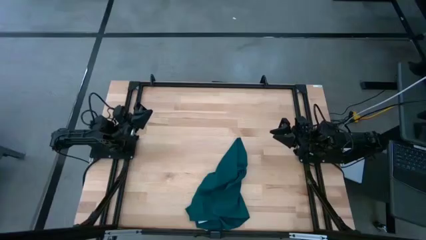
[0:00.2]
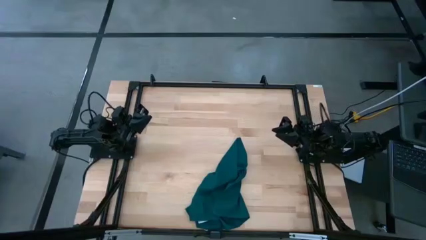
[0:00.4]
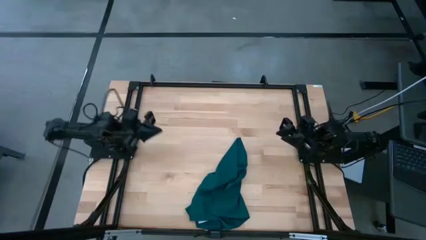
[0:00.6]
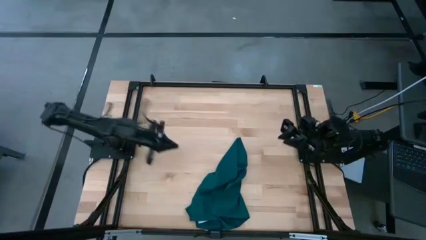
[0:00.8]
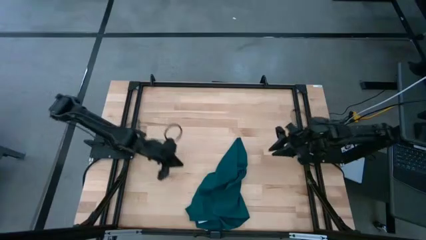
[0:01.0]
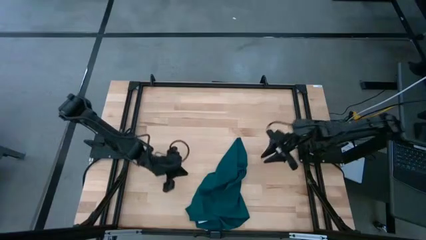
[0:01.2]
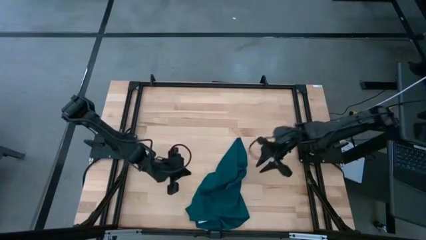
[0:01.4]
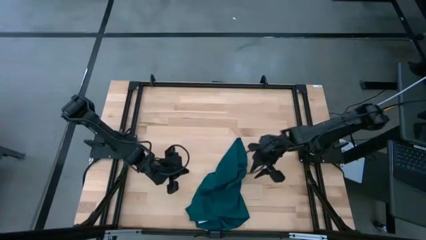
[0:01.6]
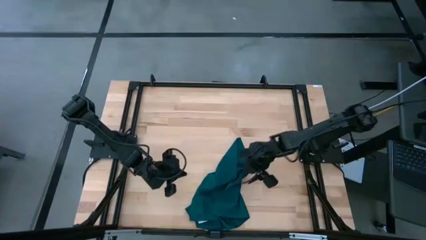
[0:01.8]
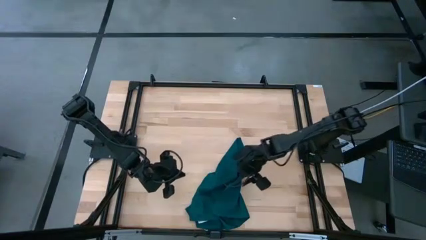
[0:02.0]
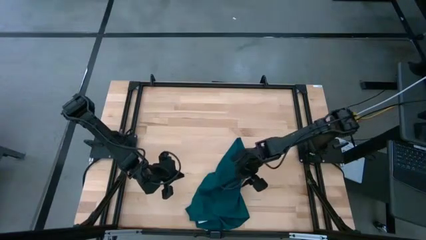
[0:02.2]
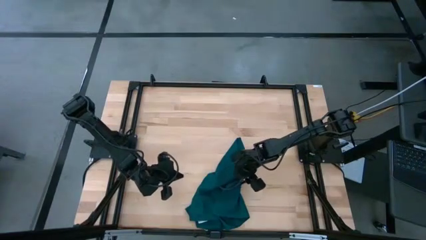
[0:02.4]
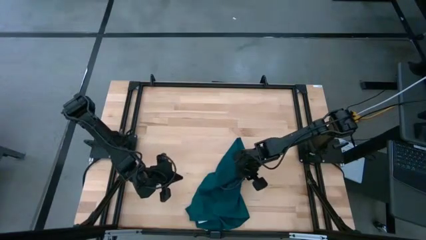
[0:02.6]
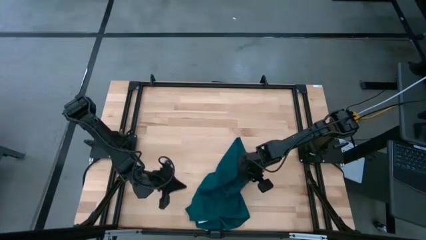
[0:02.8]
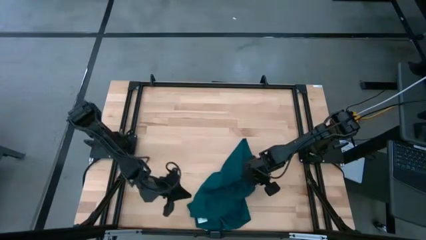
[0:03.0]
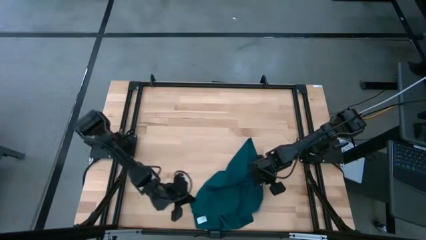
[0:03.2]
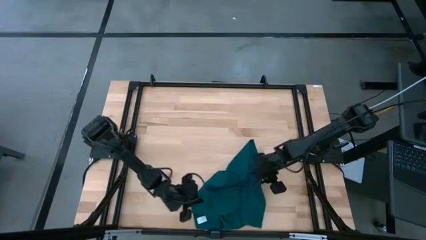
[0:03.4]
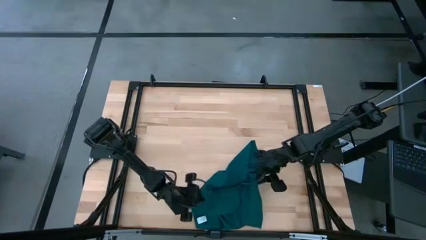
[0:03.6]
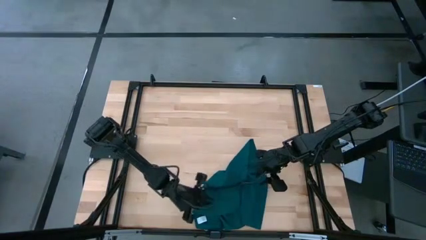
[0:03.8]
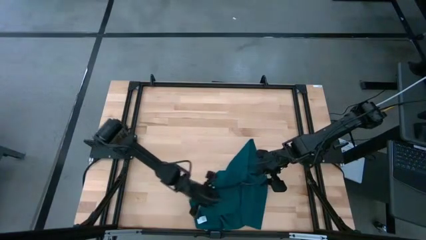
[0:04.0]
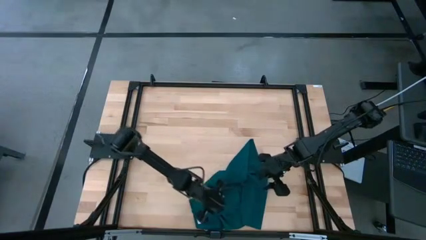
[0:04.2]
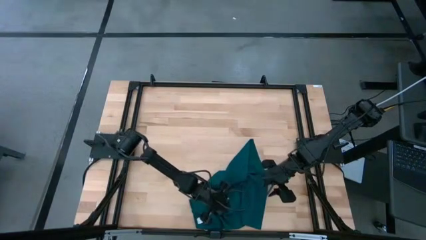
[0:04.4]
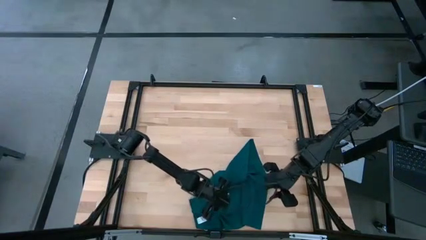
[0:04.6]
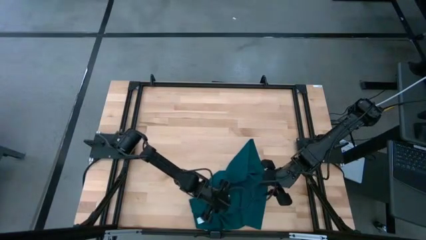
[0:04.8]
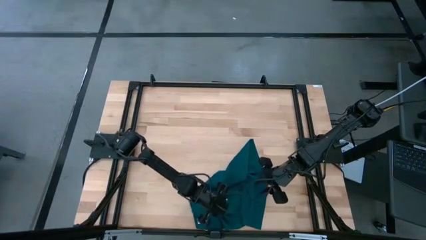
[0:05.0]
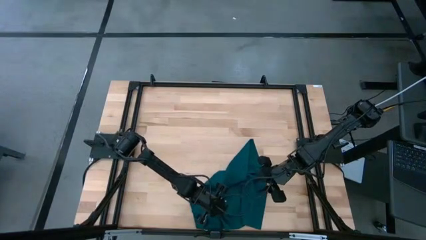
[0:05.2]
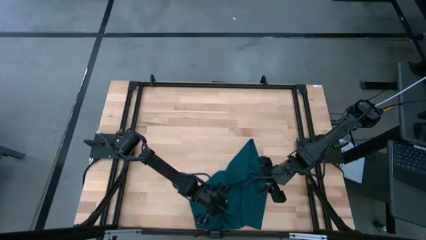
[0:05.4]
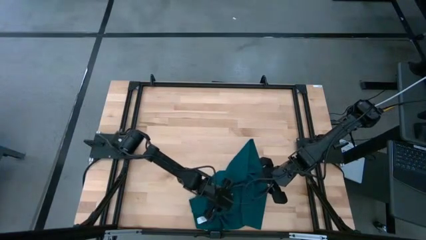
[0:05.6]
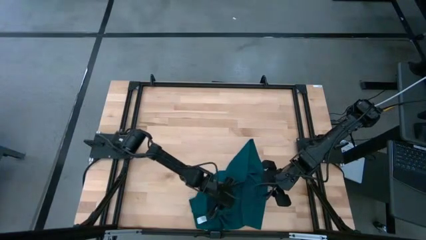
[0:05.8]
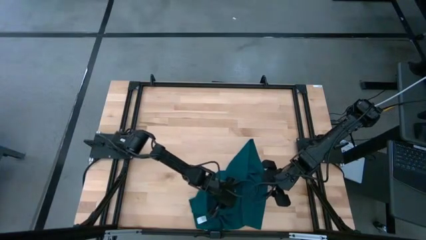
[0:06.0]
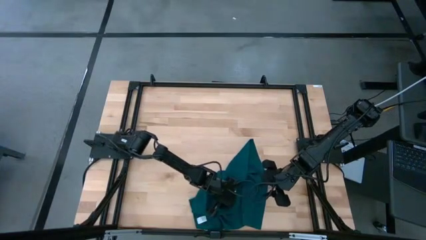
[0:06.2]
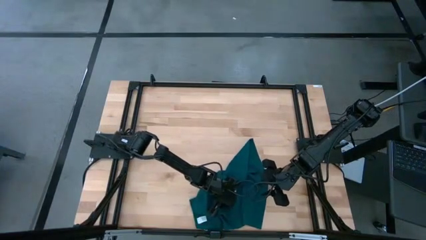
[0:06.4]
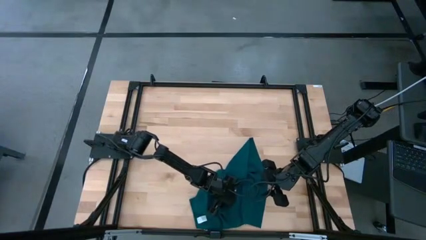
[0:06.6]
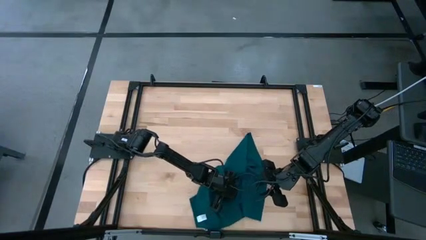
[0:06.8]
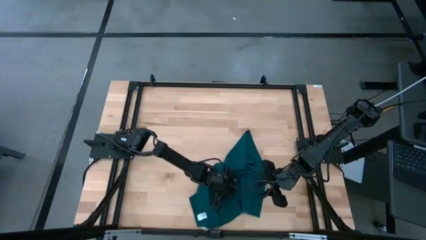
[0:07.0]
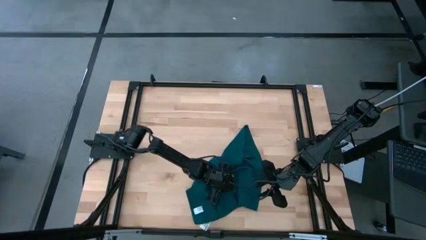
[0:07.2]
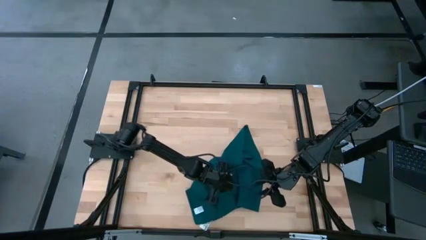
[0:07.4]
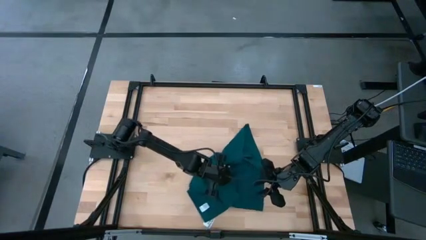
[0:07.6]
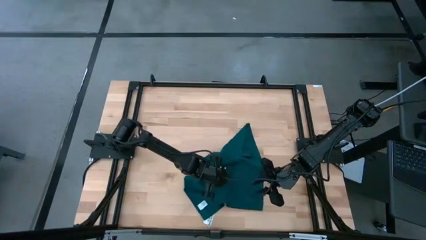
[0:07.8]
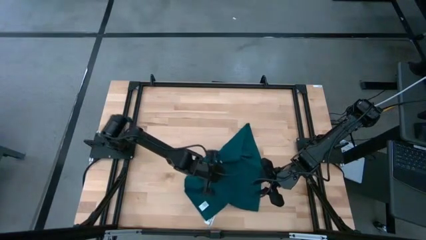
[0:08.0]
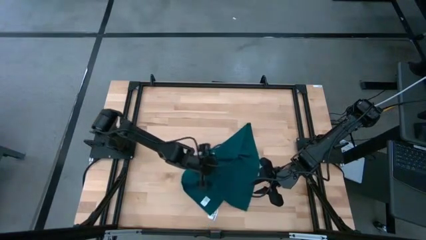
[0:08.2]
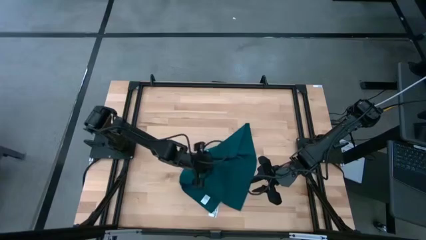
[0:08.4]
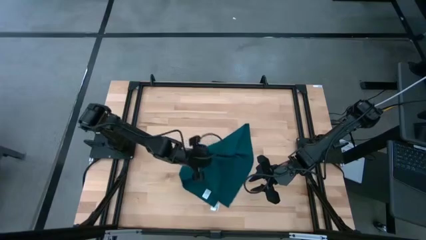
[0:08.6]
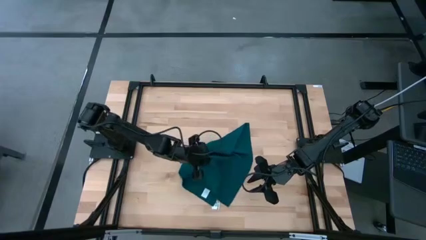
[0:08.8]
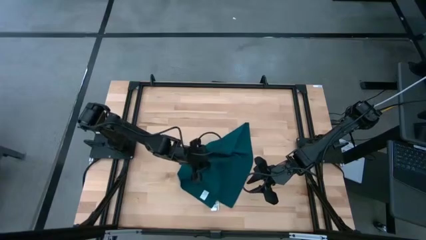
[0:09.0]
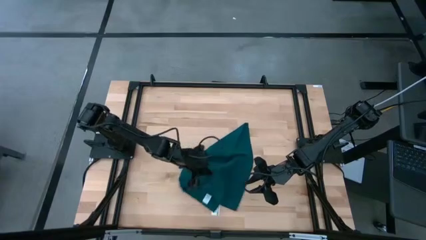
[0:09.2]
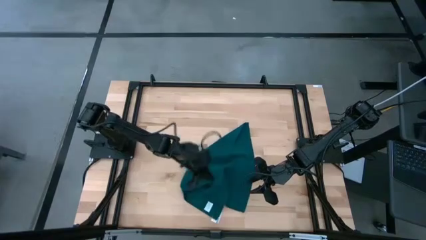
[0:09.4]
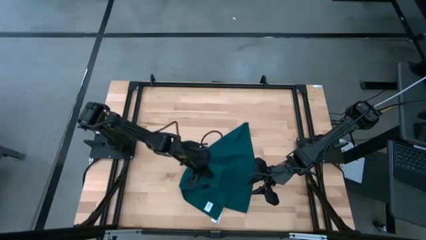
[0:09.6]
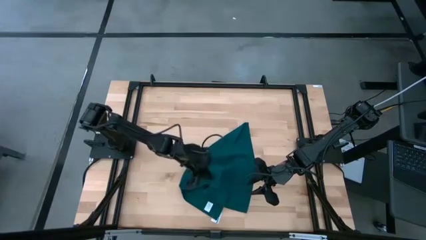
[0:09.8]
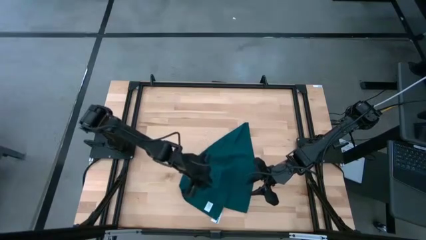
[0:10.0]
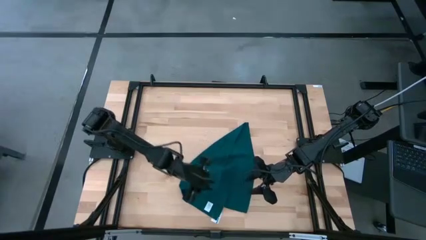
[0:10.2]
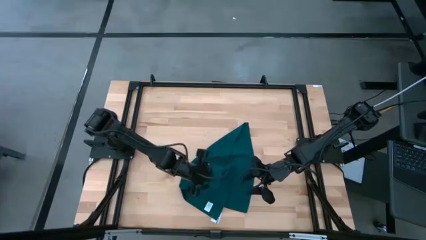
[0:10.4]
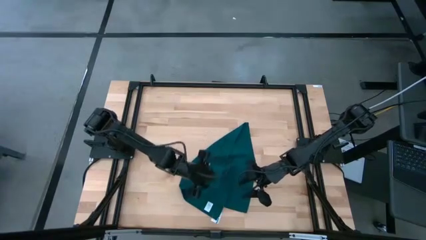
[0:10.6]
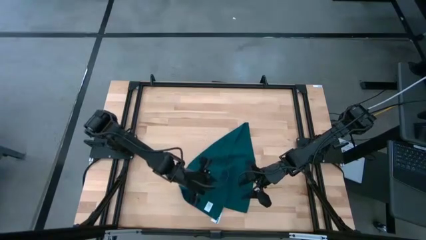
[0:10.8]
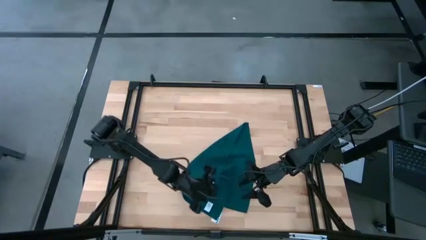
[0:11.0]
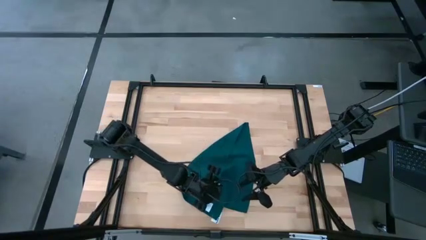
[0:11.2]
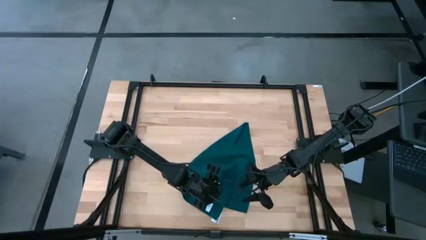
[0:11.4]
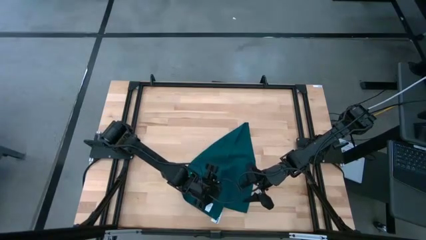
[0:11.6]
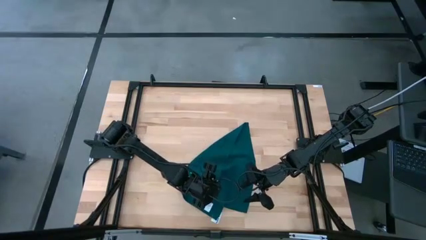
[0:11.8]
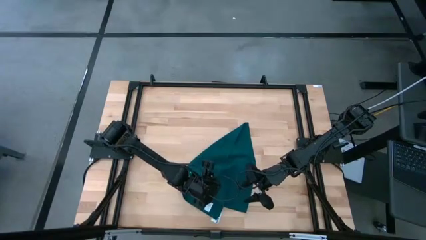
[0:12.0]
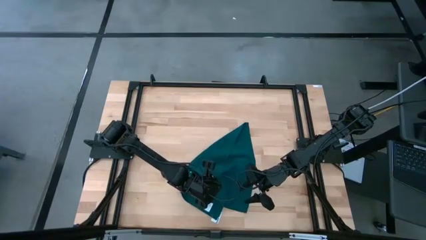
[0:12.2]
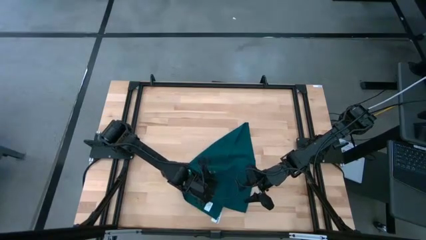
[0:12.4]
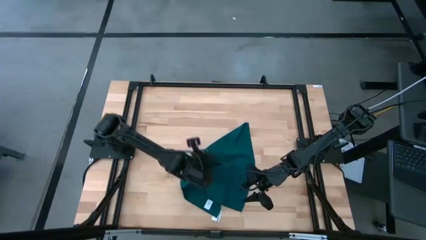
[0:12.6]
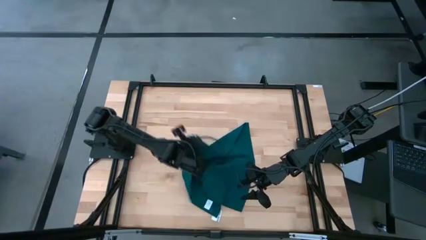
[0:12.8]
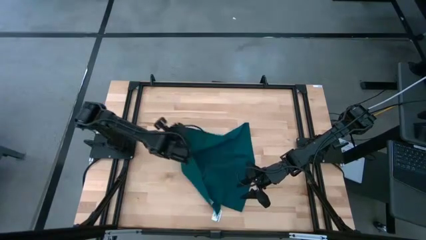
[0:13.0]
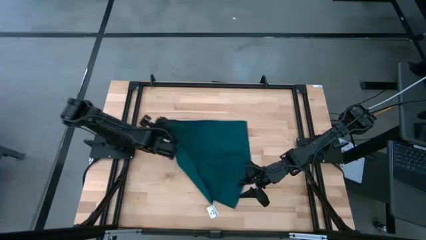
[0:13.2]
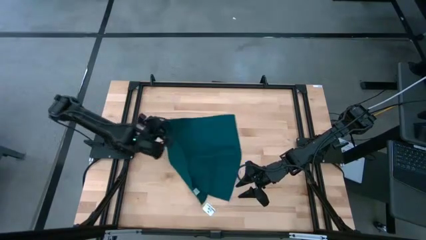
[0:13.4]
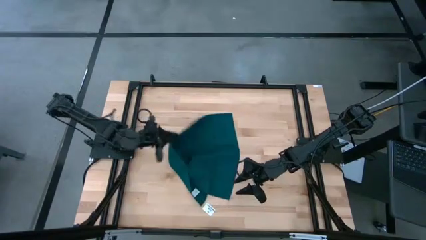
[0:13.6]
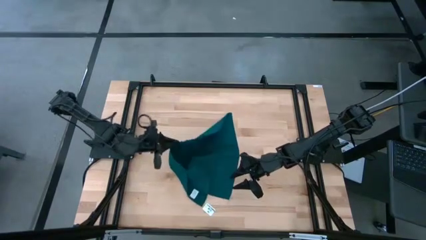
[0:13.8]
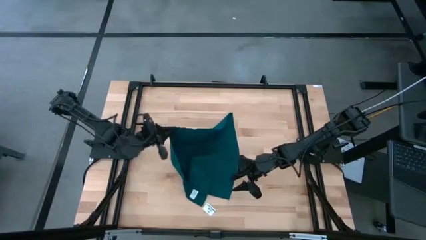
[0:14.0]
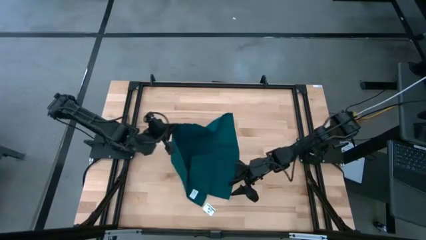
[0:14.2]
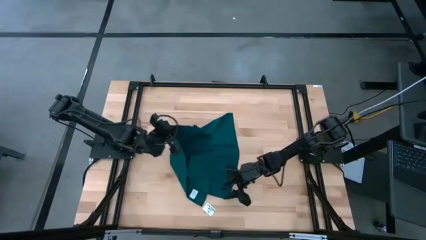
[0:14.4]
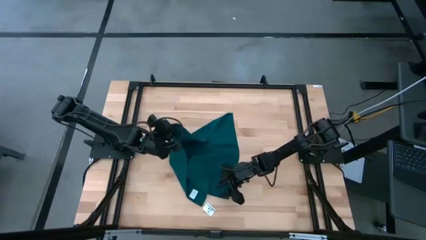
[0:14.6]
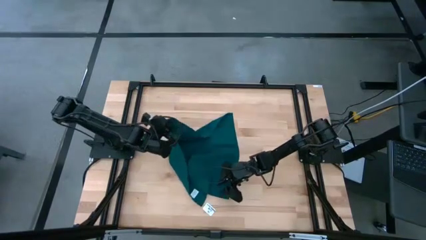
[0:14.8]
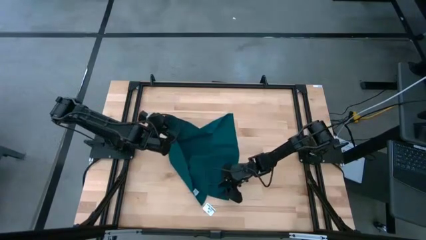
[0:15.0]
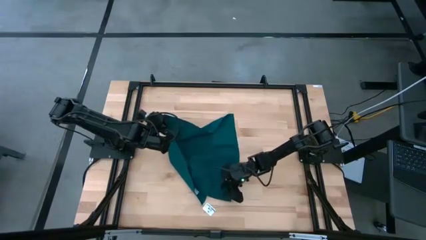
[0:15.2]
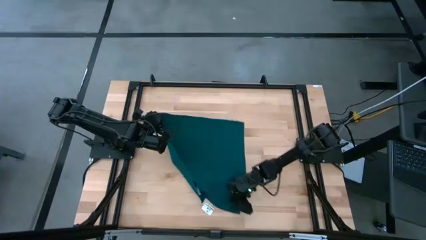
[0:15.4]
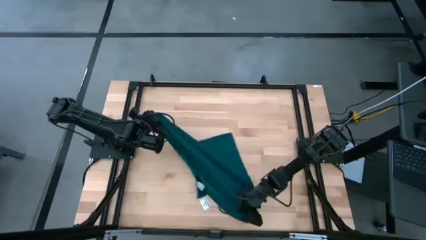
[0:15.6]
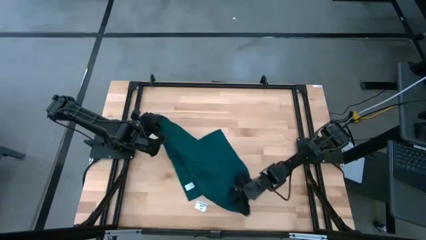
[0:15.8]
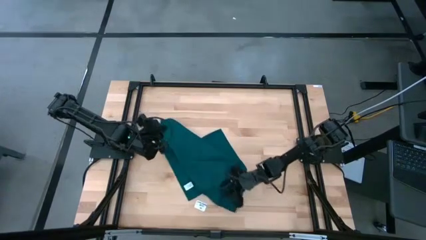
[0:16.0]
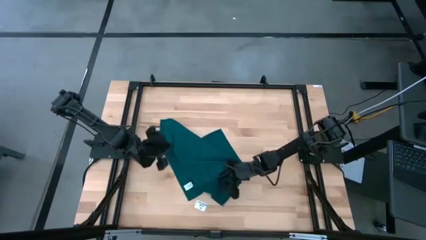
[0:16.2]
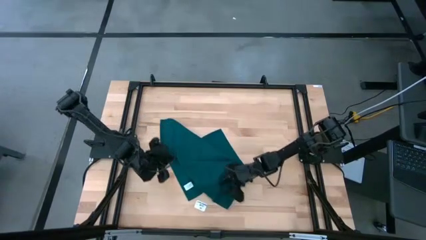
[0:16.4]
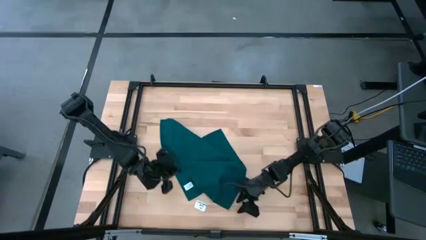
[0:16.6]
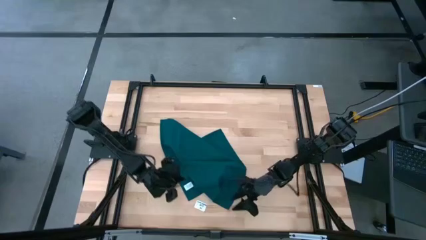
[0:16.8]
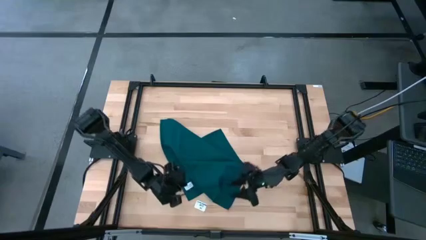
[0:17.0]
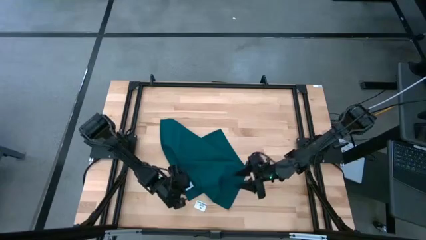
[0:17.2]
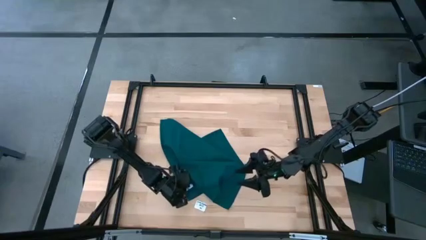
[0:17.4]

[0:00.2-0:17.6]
Task: Fold microfiber towels
Fold the towel
